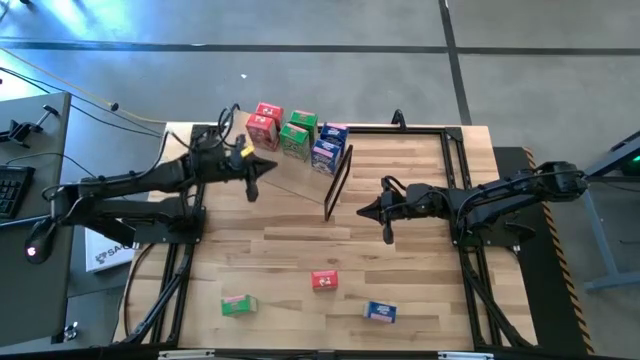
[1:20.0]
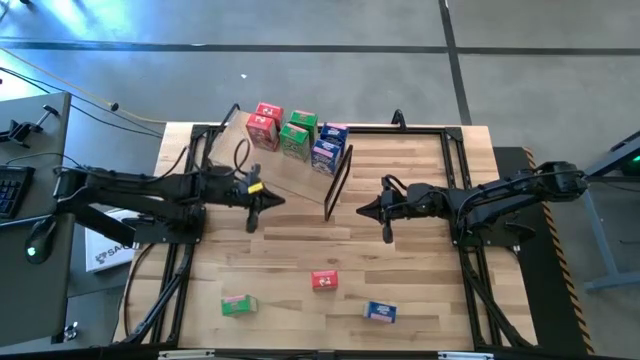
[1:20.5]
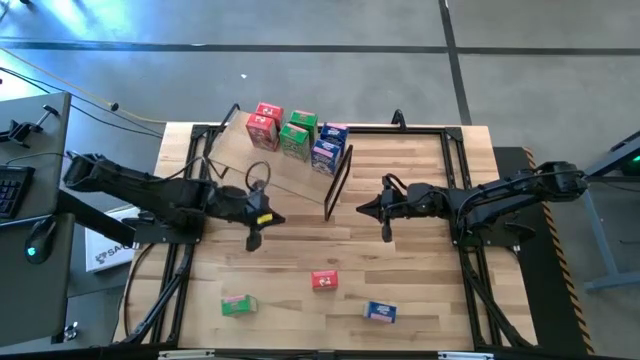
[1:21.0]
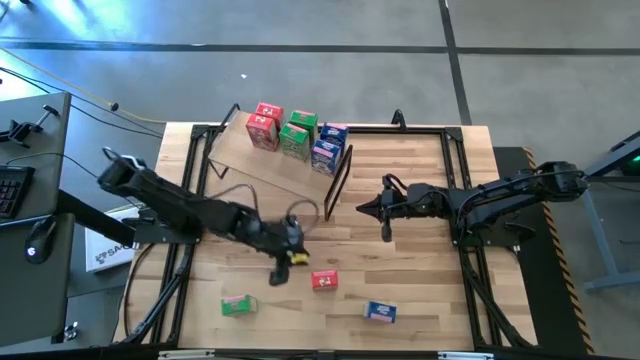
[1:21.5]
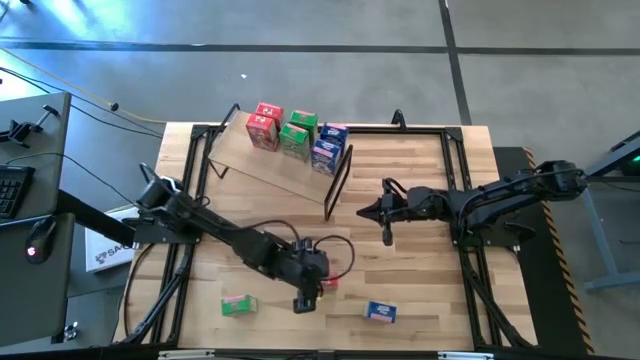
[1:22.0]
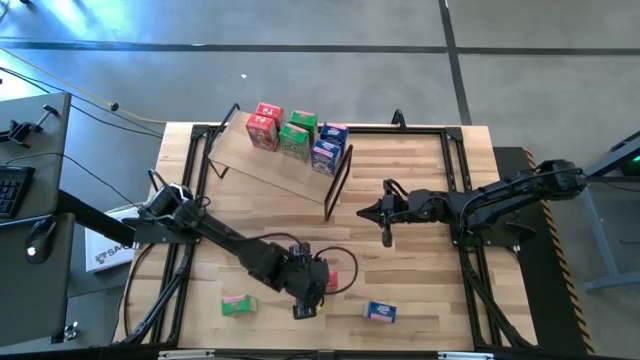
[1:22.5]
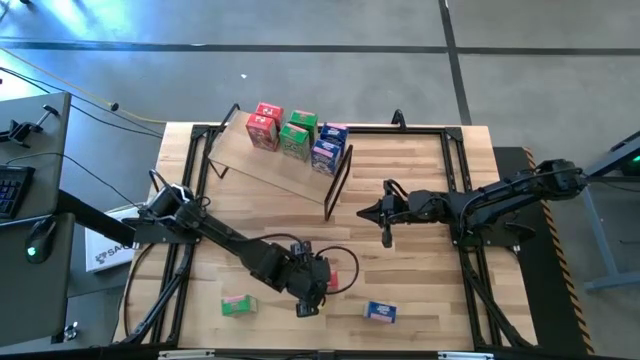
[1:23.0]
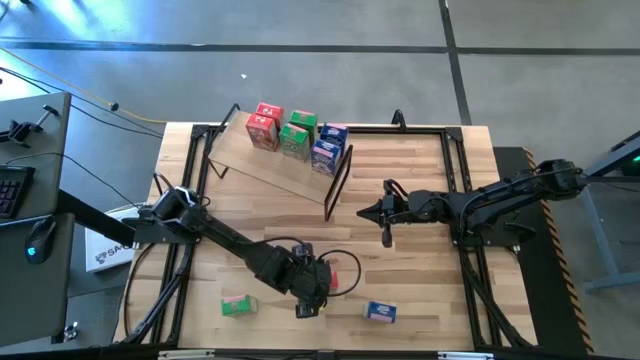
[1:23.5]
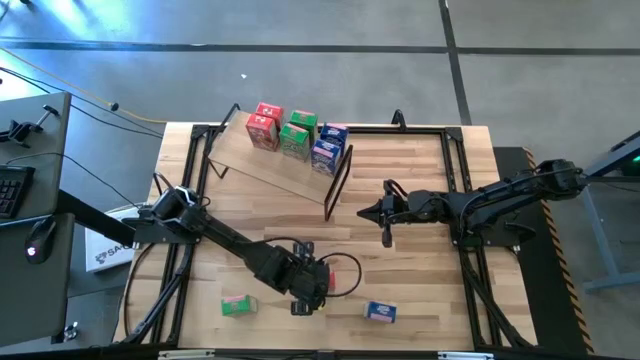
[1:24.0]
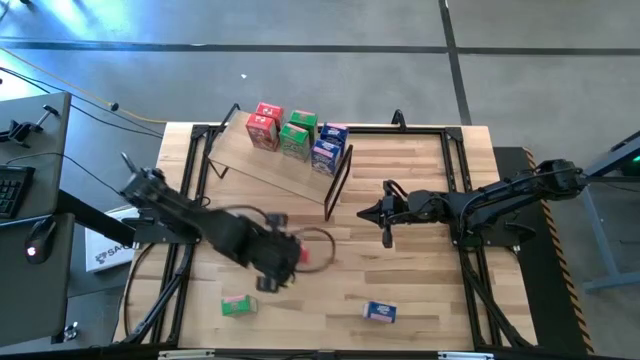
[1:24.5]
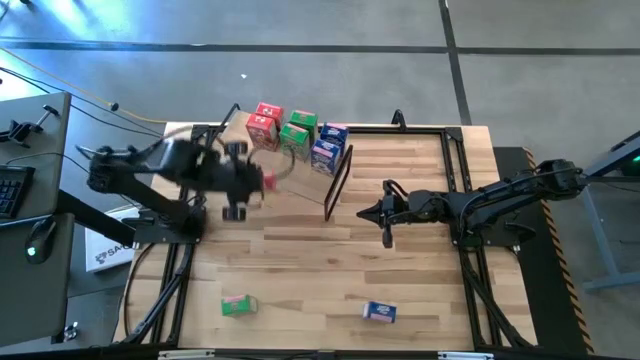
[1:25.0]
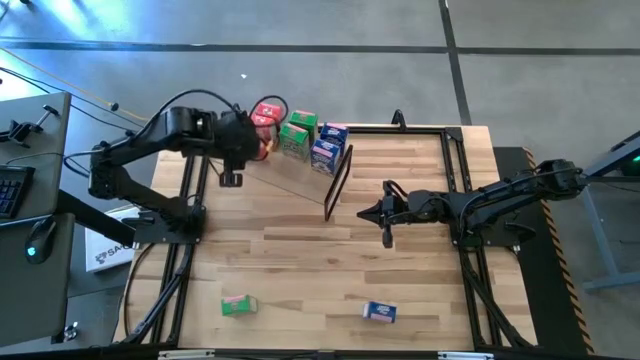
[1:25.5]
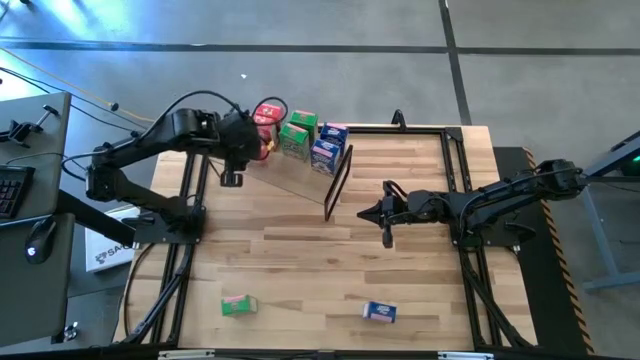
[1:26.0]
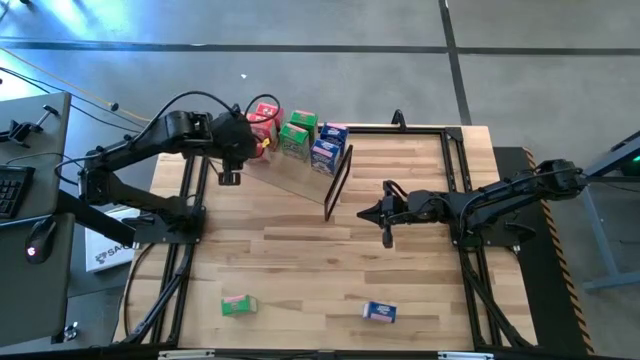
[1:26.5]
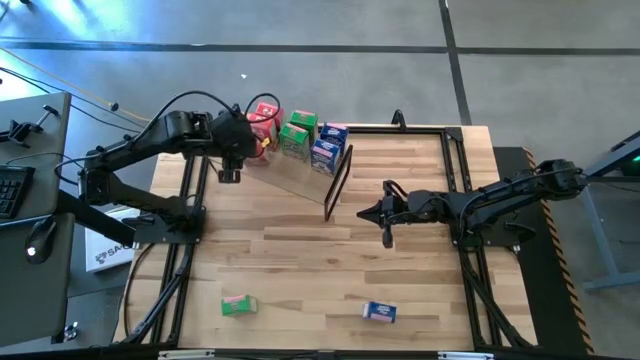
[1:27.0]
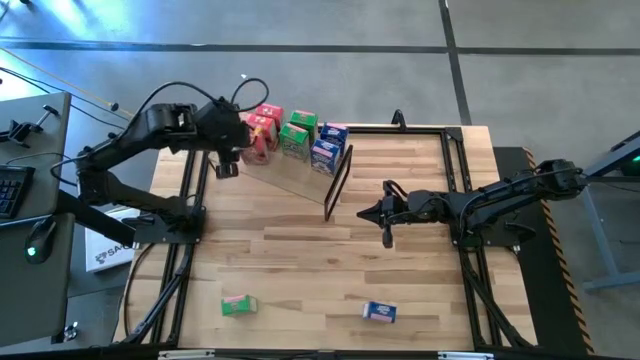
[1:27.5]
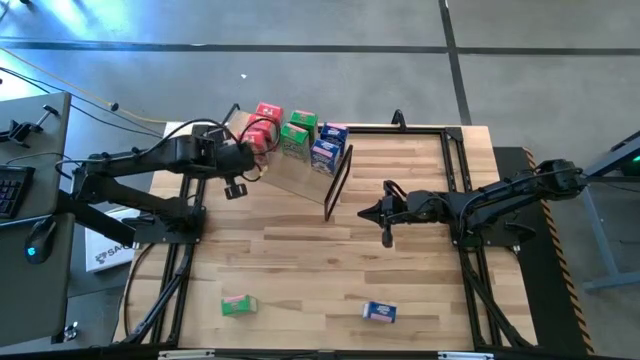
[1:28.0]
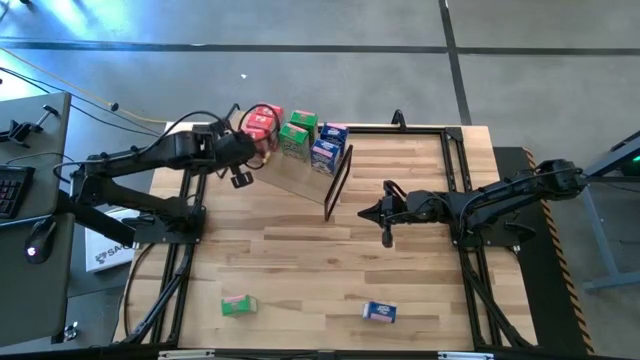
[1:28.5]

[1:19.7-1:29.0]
Task: Stack cereal on shelf
Put the red cereal box on the shelf aligned with the other red cereal box

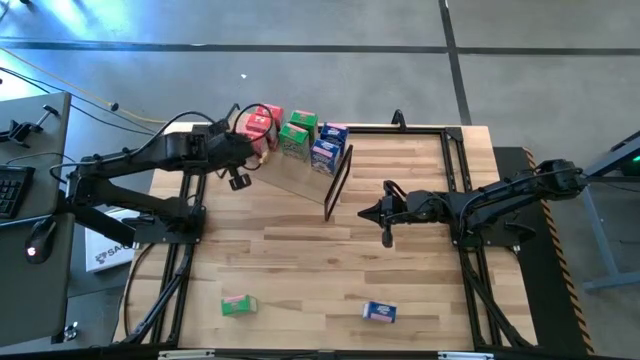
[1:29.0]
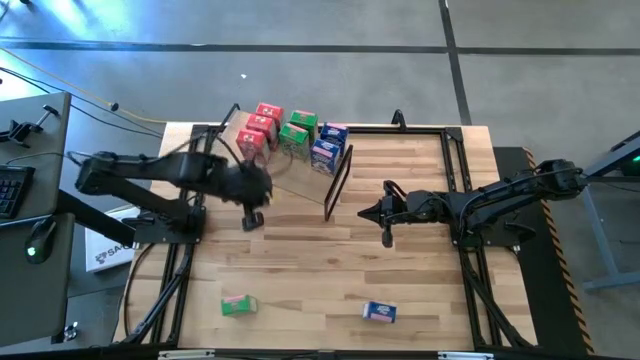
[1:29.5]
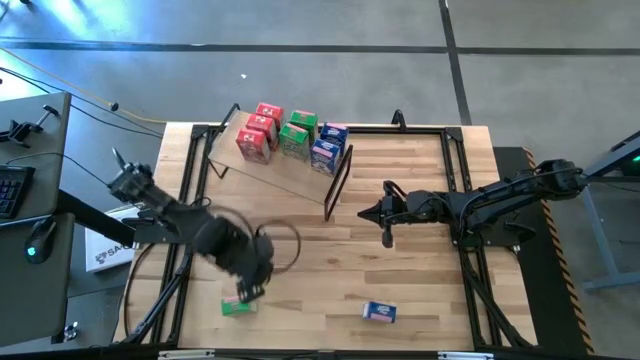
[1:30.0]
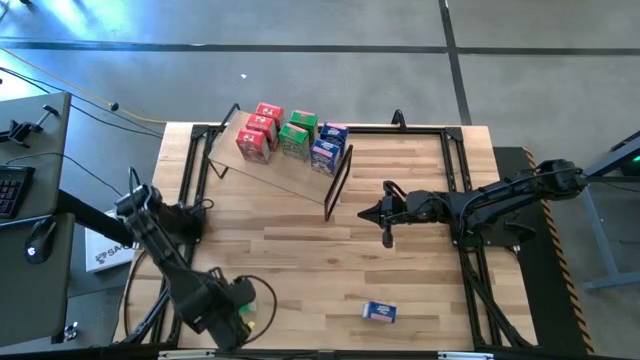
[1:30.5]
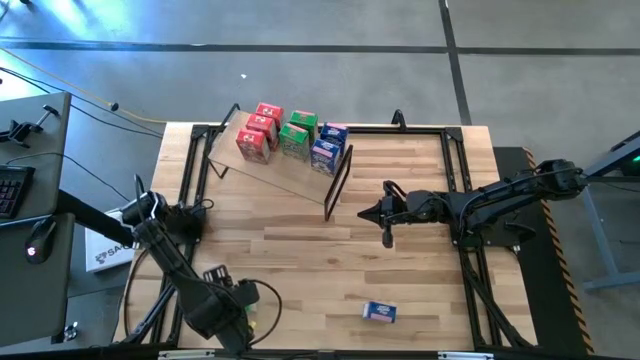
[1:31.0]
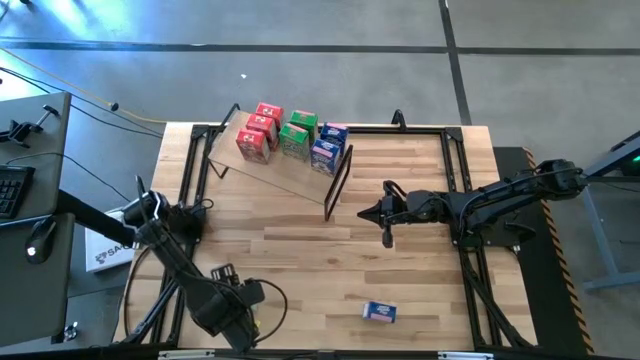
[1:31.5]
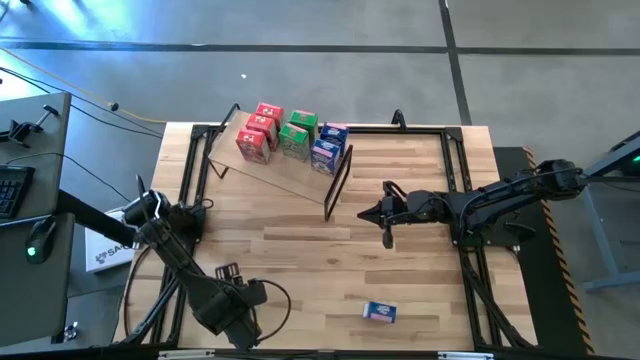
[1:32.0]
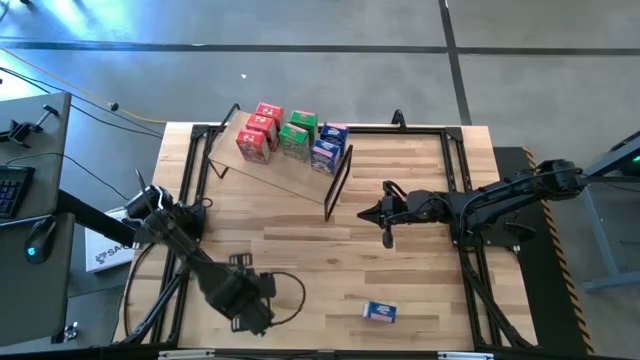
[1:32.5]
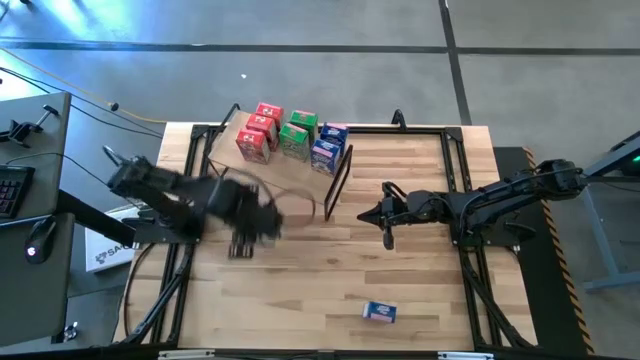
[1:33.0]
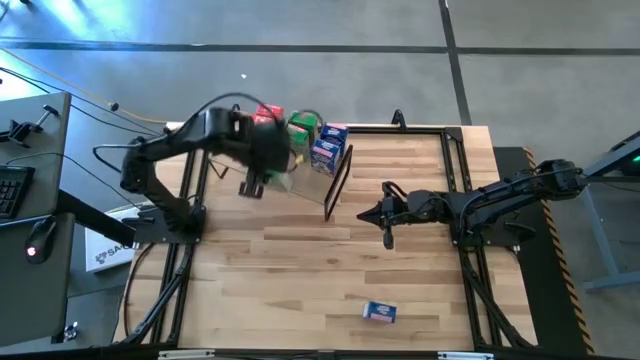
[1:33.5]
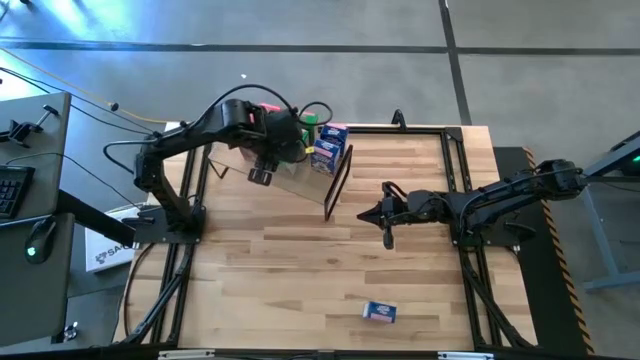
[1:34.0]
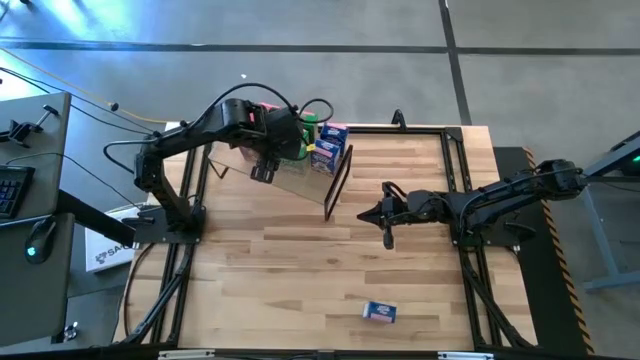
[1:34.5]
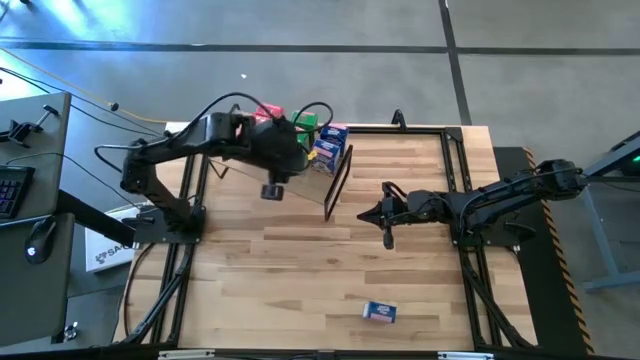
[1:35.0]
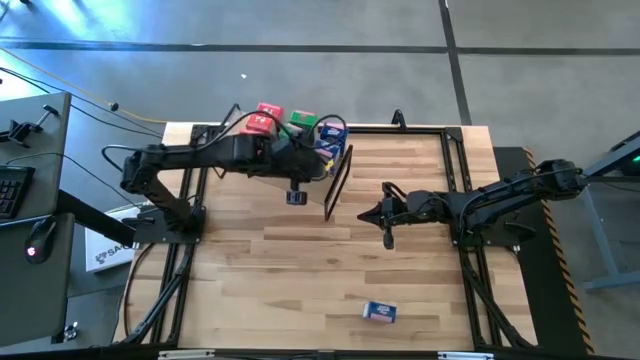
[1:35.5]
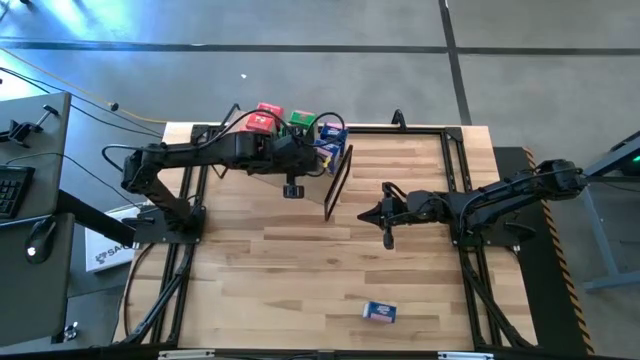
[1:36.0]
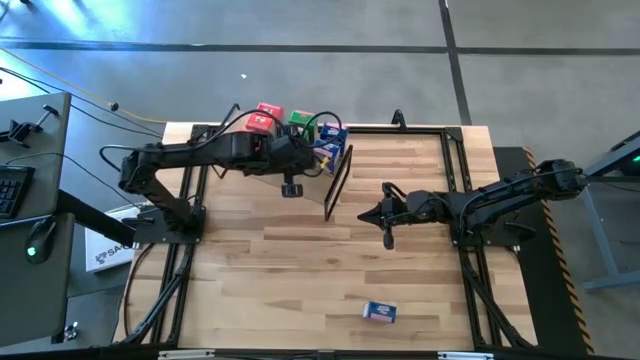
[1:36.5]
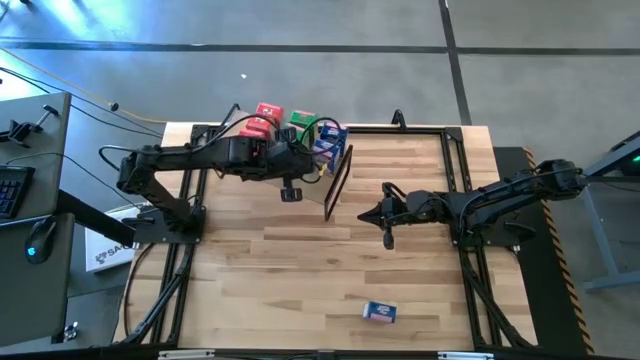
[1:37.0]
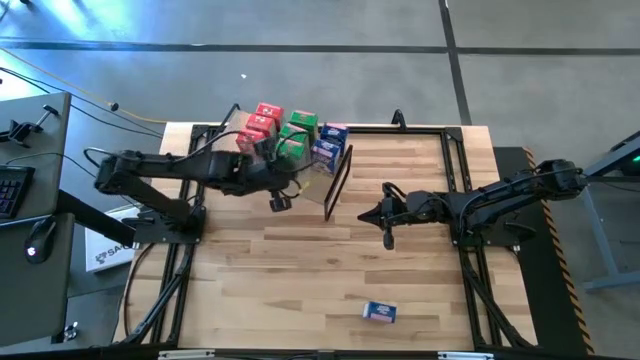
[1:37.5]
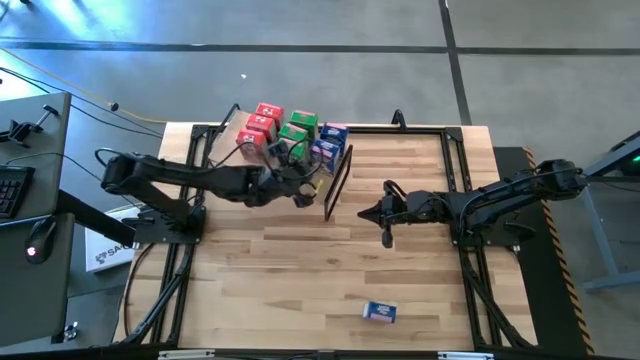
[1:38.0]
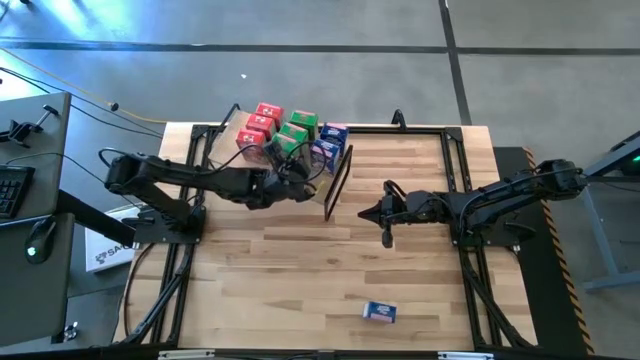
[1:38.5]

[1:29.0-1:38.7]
Put the green cereal box on the shelf aligned with the other green cereal box

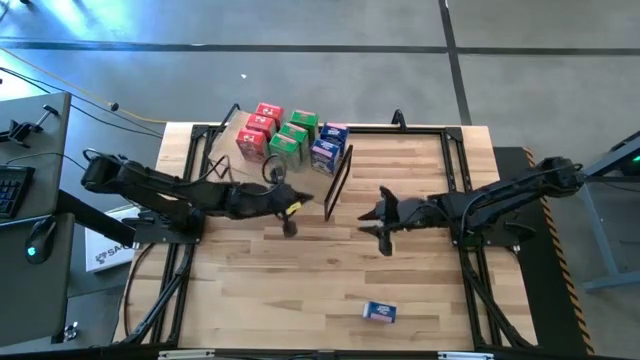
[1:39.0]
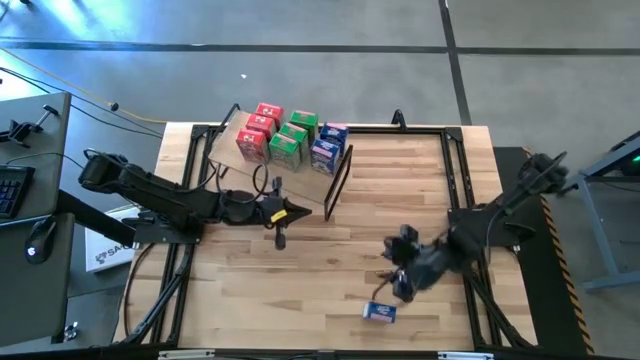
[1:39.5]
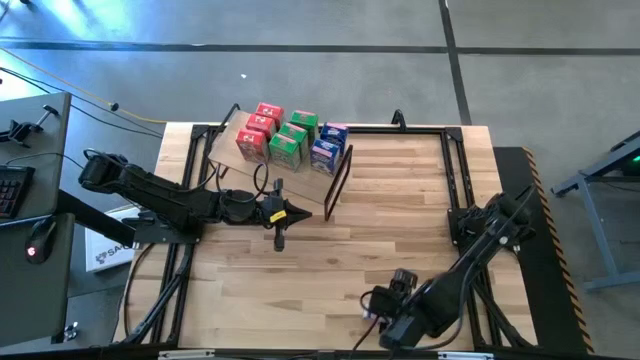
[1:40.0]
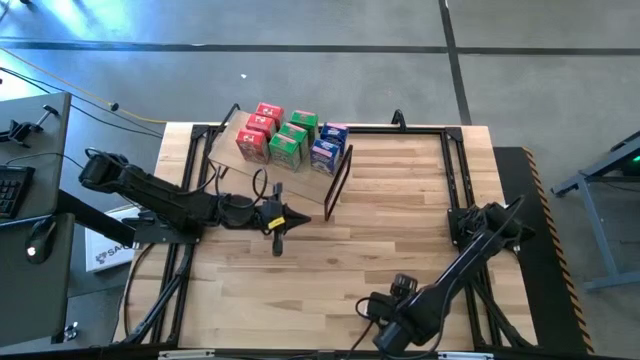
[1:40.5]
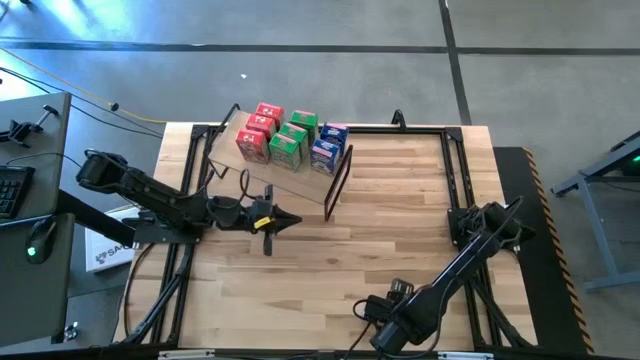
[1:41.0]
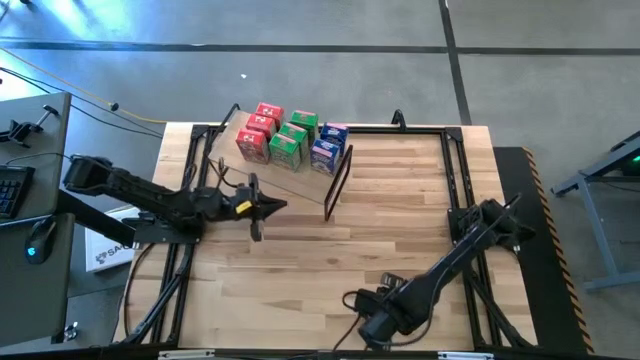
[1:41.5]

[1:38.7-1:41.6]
Put the blue cereal box on the shelf aligned with the other blue cereal box
